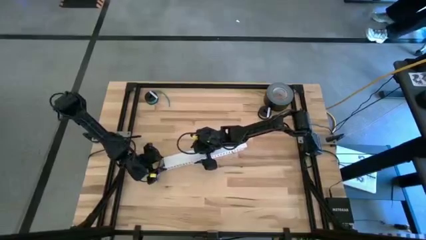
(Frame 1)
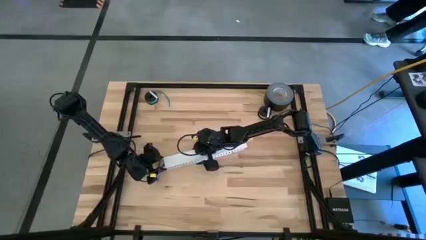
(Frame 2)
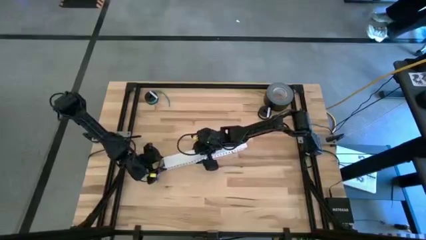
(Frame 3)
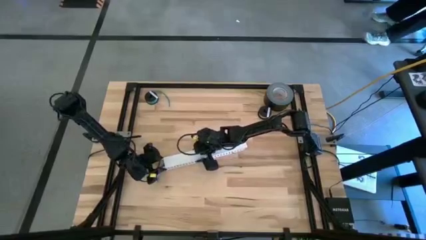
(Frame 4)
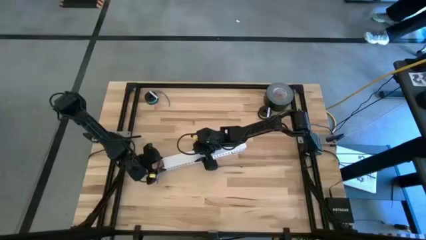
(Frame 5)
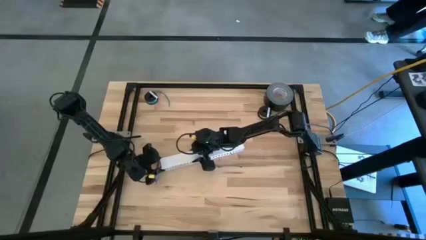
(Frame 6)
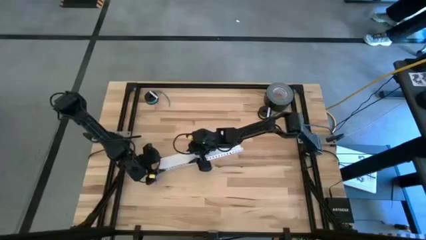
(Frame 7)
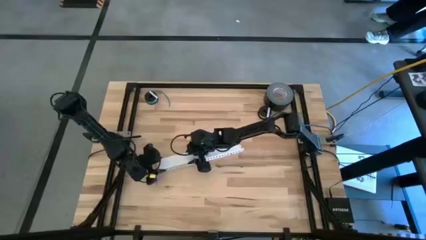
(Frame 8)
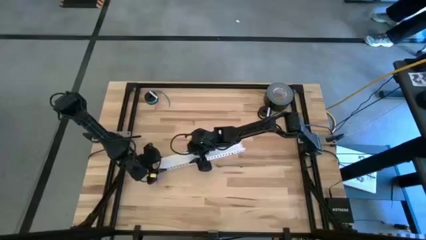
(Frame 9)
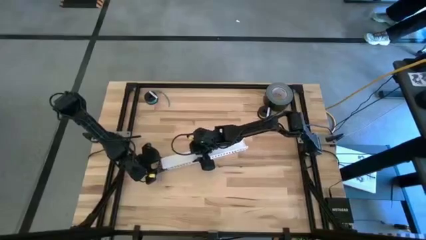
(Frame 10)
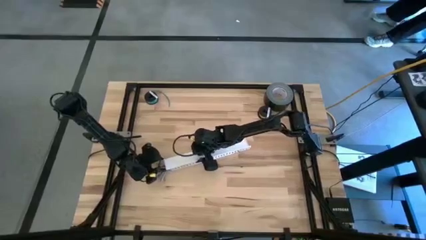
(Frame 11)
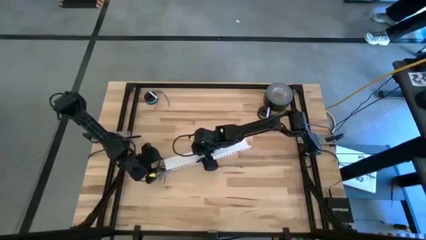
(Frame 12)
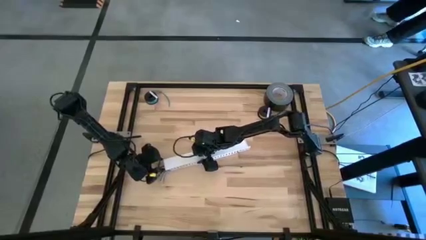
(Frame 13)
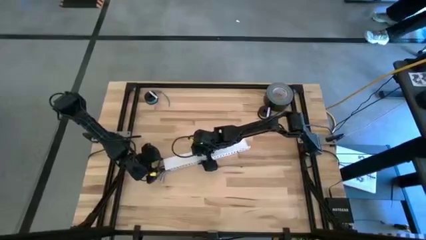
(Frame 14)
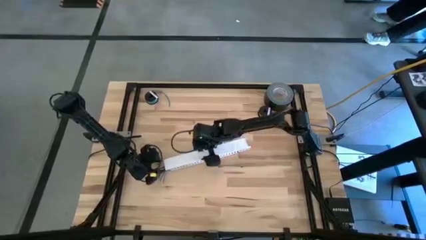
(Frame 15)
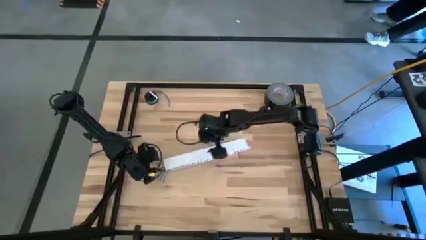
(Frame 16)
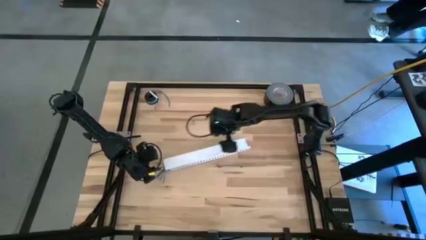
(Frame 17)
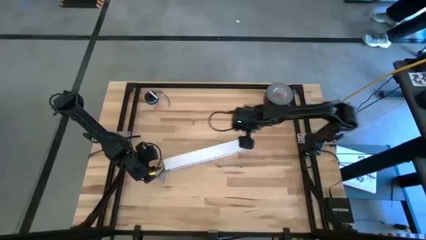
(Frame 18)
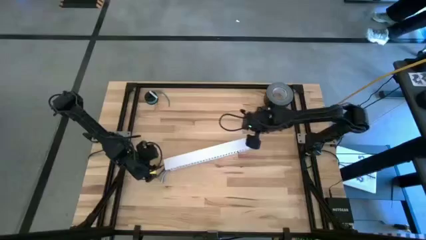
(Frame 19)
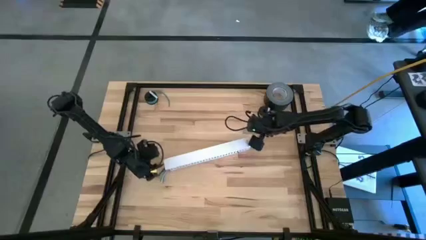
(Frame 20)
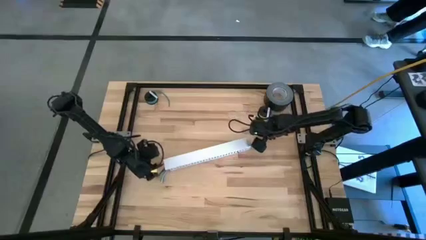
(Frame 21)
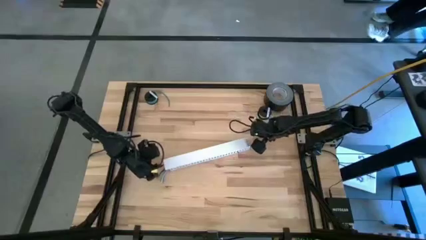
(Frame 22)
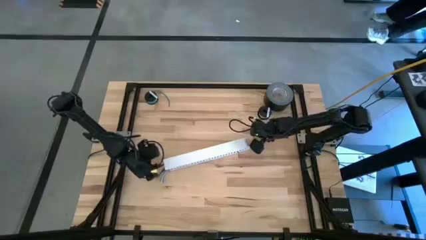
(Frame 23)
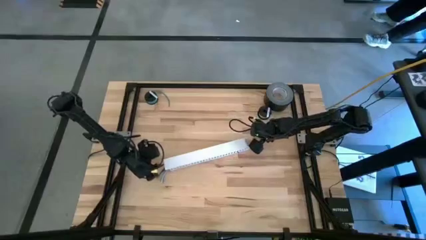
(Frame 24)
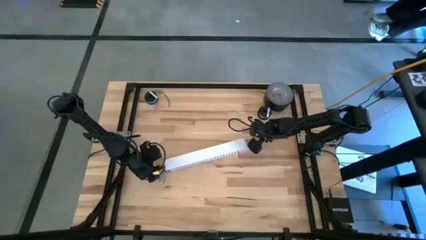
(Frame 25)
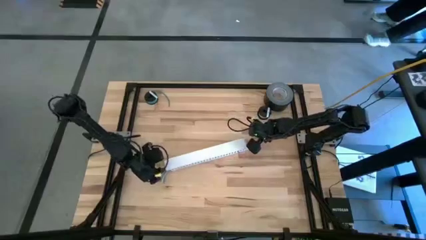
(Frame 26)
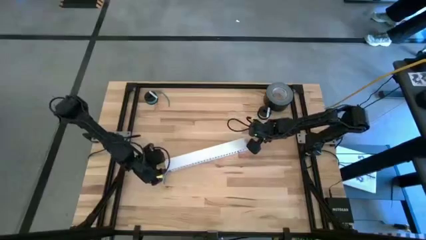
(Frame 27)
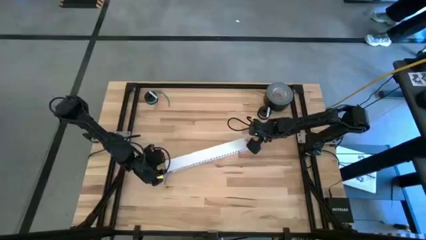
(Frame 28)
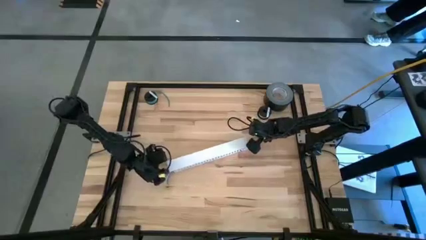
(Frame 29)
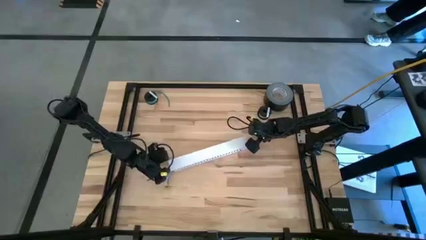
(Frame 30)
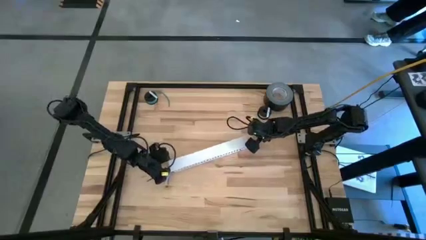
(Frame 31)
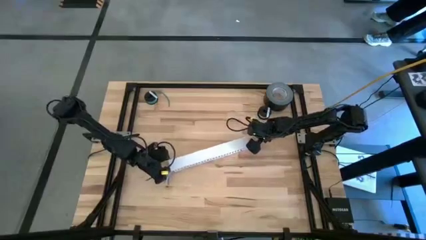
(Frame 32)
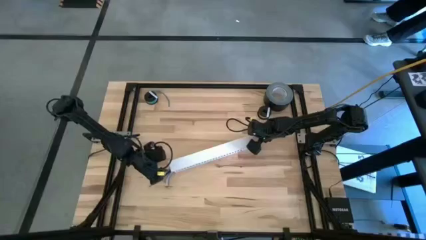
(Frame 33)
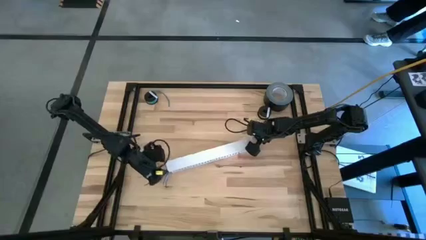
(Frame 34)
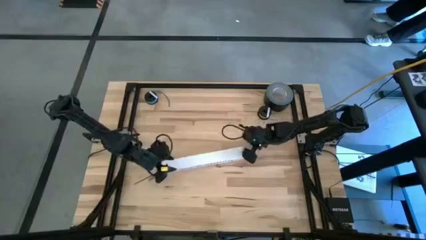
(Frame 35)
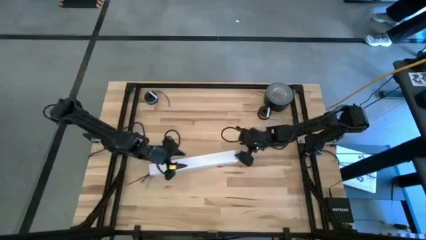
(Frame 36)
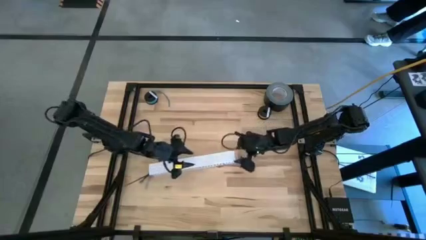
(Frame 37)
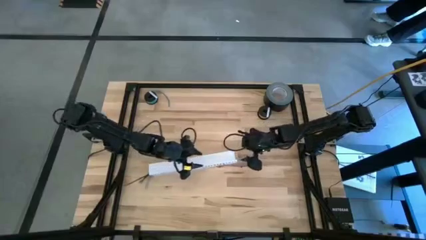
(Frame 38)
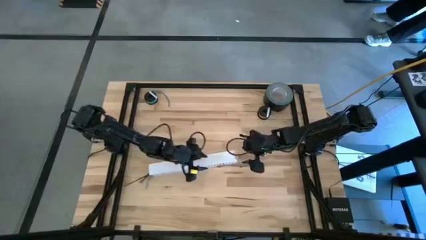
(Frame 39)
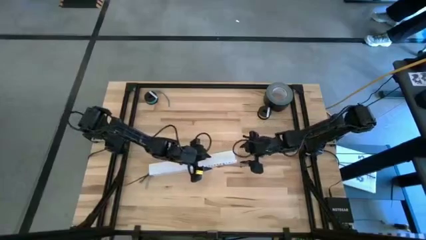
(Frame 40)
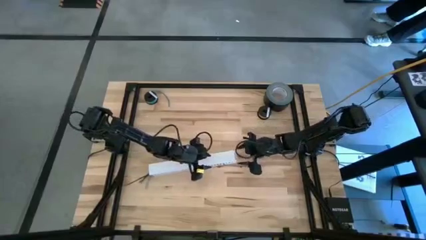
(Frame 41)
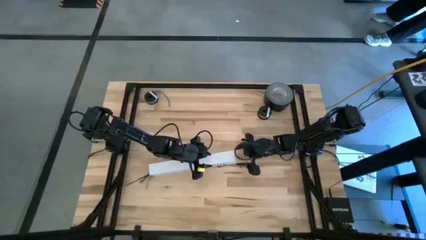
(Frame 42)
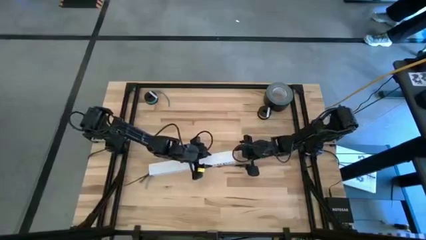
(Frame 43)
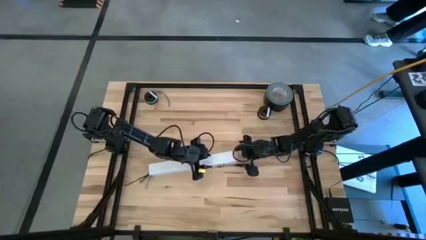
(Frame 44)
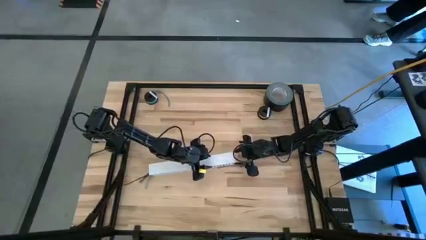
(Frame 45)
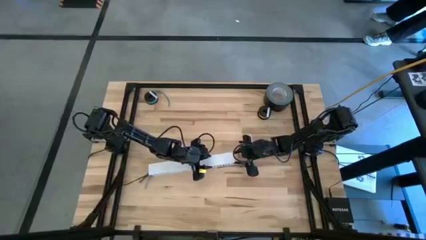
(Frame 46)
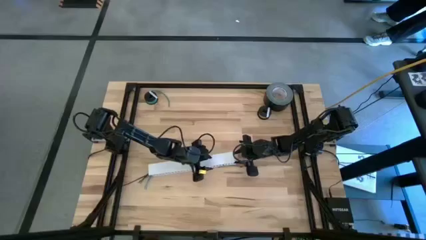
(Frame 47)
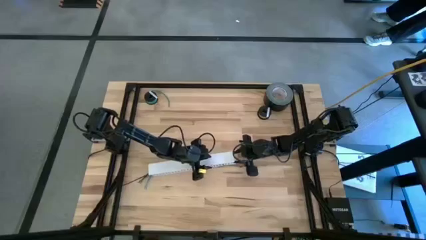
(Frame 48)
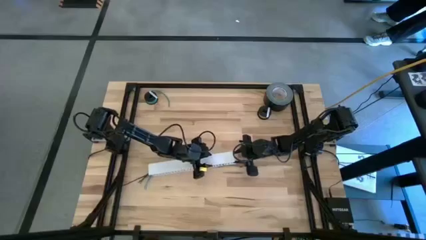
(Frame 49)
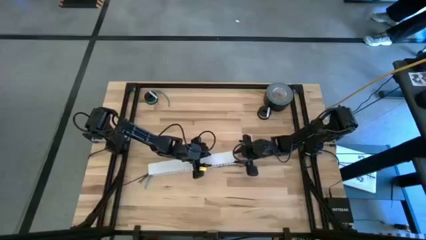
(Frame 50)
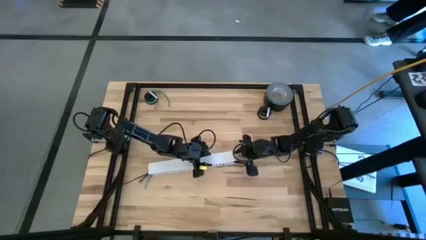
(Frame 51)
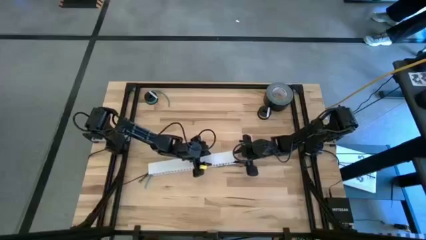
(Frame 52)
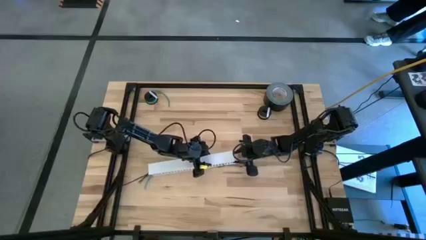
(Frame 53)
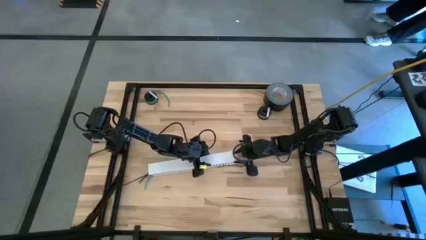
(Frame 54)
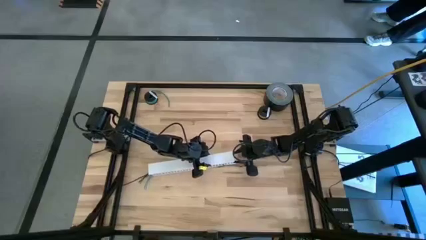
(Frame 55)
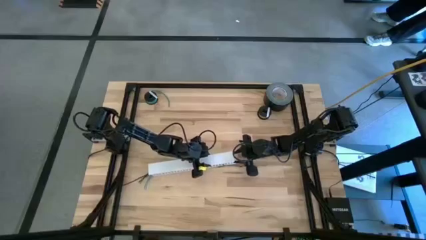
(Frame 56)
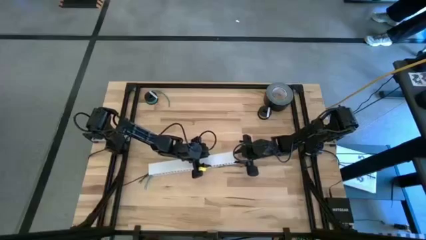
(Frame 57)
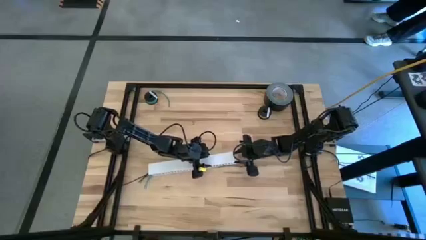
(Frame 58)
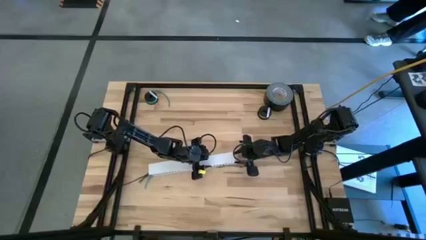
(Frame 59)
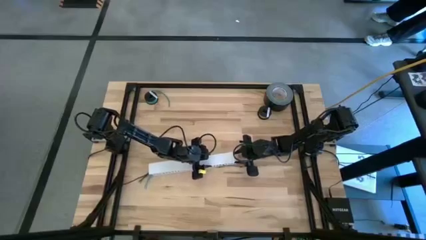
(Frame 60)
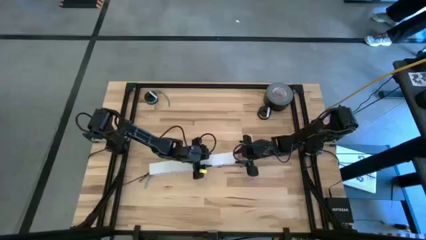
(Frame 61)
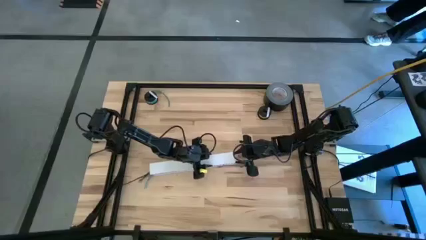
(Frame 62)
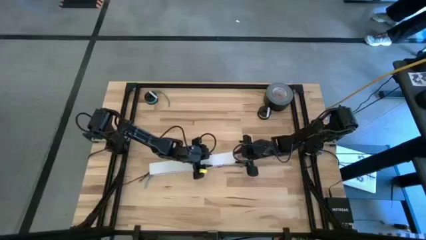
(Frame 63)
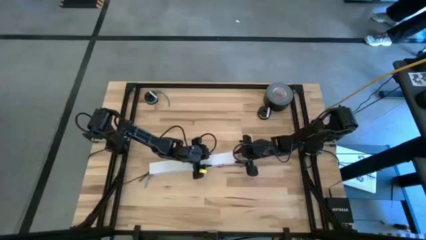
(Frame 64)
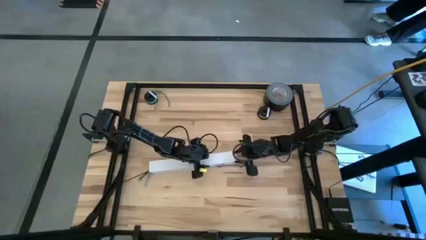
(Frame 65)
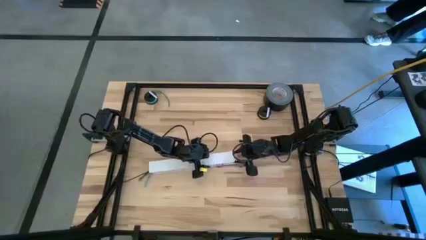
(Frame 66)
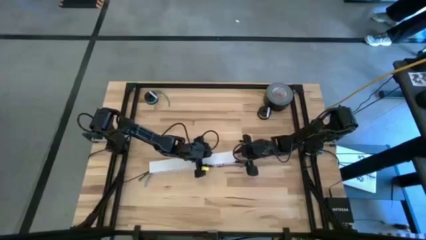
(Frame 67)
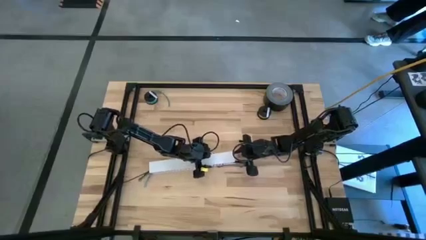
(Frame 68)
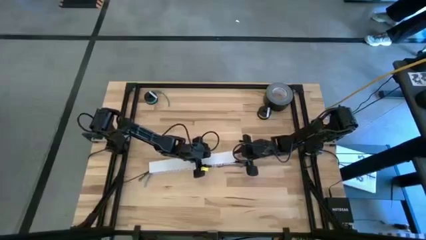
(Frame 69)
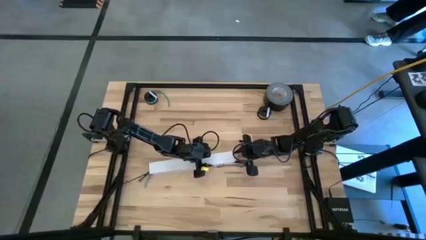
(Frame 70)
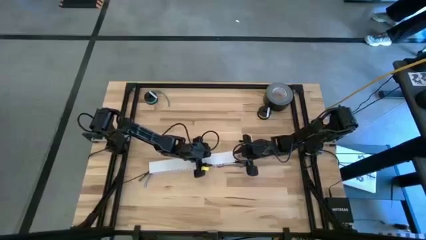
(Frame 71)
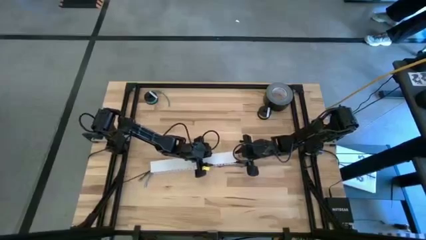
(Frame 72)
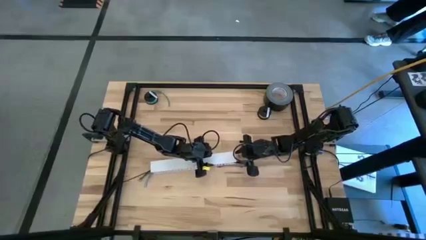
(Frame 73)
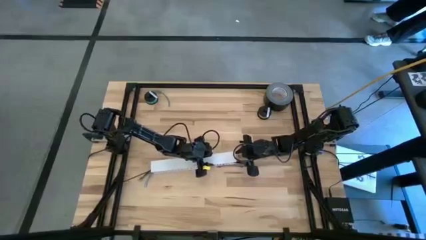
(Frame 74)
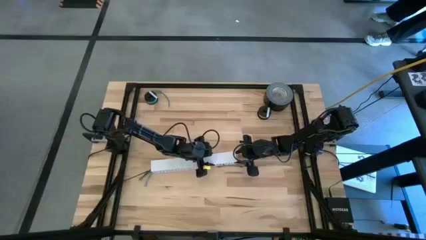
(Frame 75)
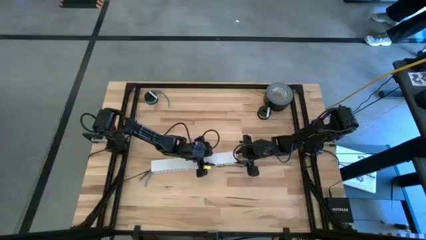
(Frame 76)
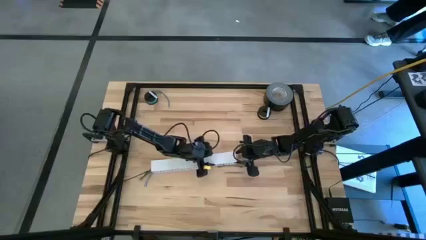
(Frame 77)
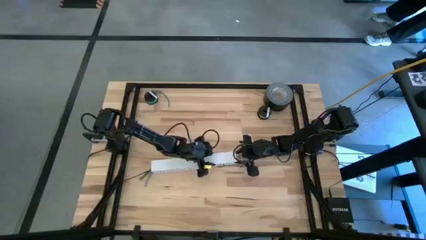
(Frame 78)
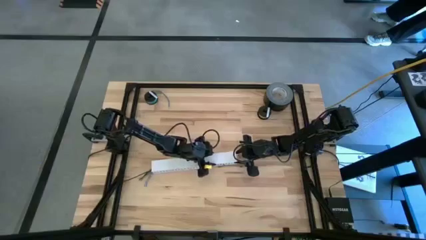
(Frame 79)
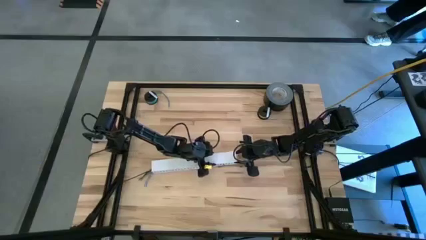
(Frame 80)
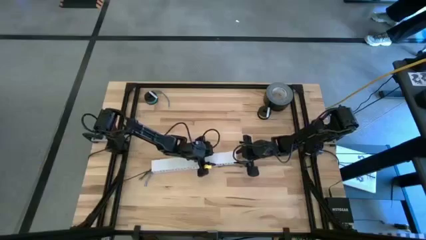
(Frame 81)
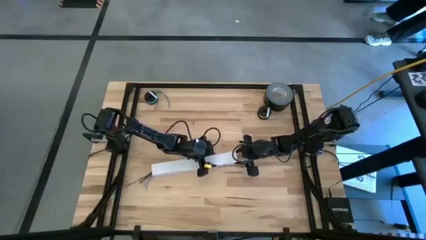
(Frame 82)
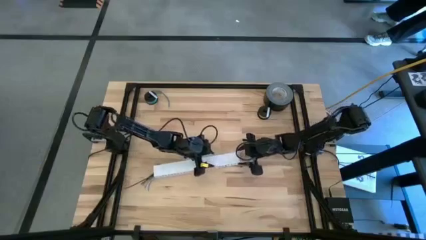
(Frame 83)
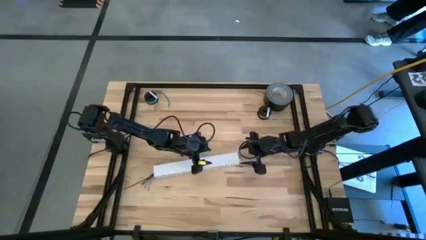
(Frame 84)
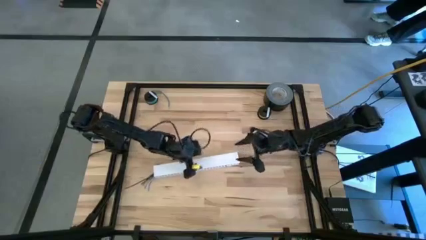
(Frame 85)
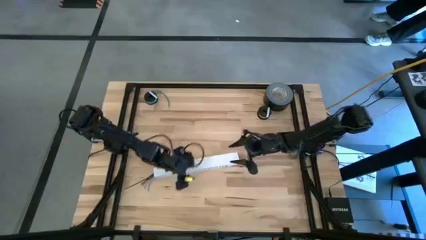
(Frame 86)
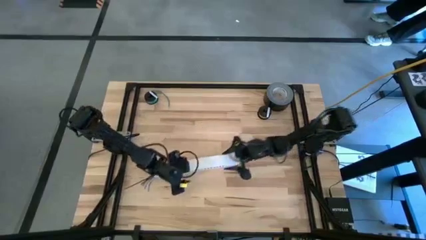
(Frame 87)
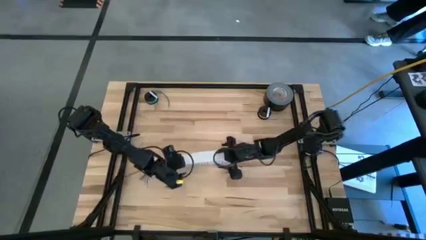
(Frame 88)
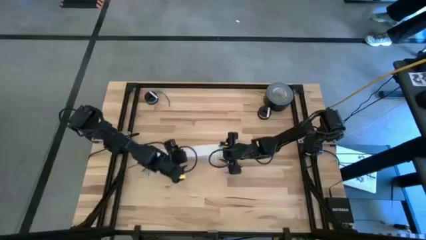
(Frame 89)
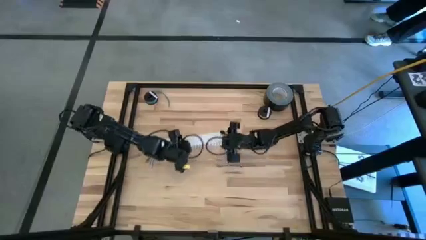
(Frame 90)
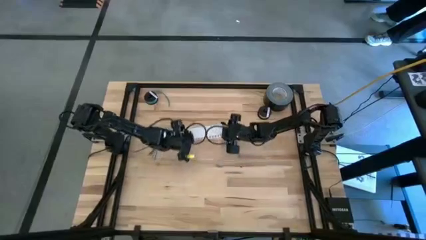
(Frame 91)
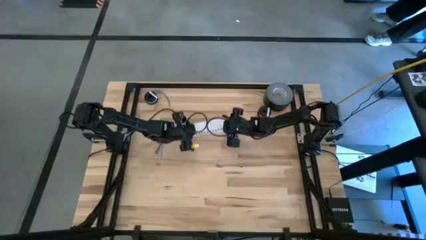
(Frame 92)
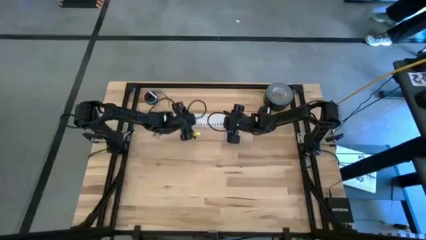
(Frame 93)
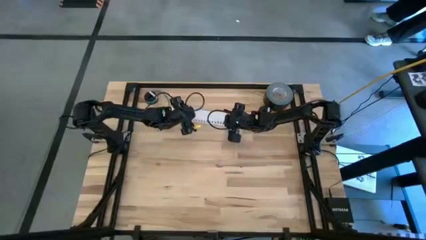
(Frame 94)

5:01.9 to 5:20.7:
Task: Ziptie cables
Close the white cable duct
